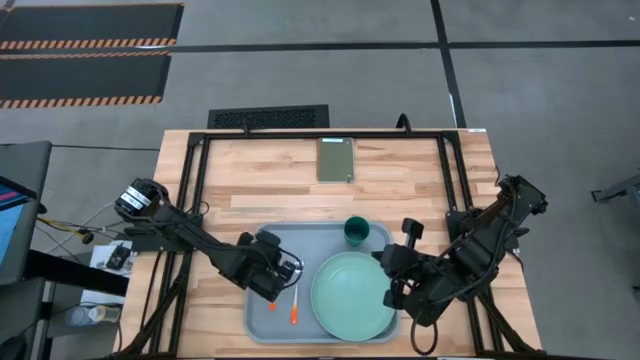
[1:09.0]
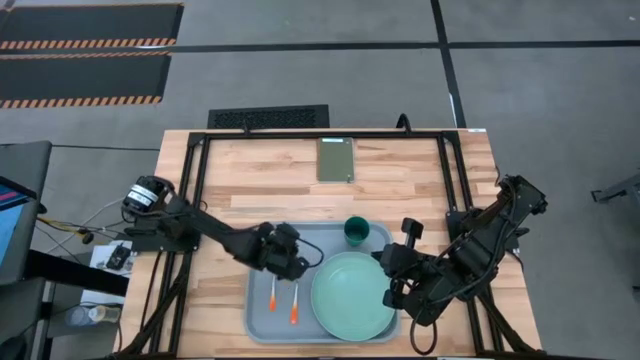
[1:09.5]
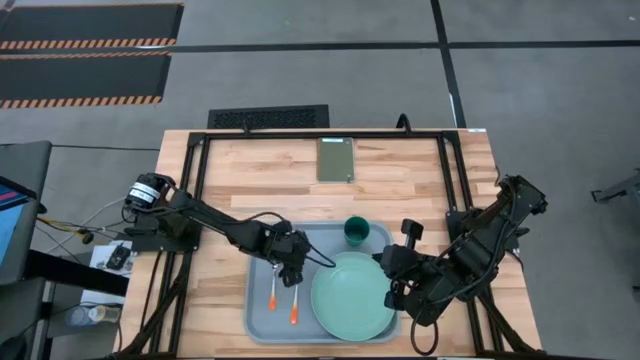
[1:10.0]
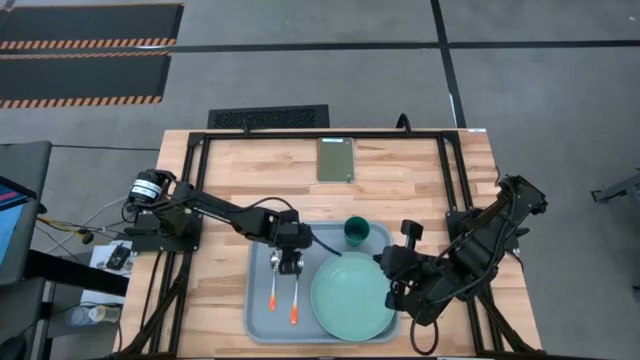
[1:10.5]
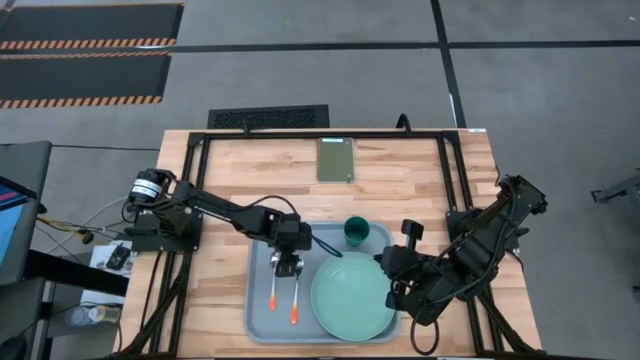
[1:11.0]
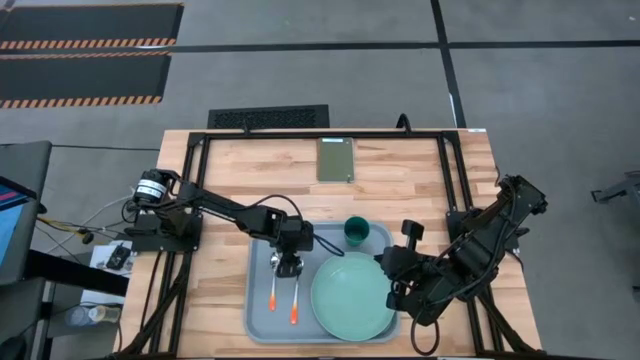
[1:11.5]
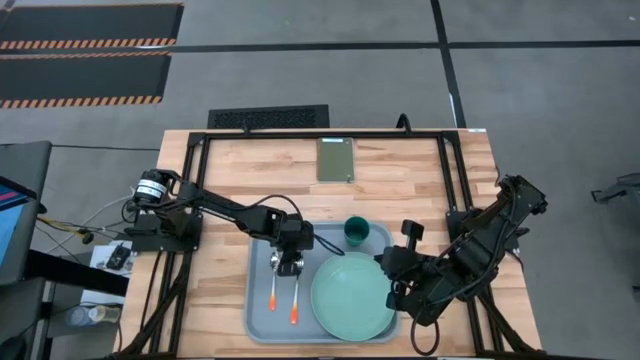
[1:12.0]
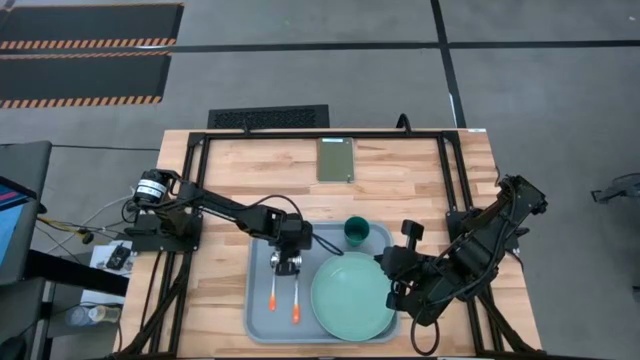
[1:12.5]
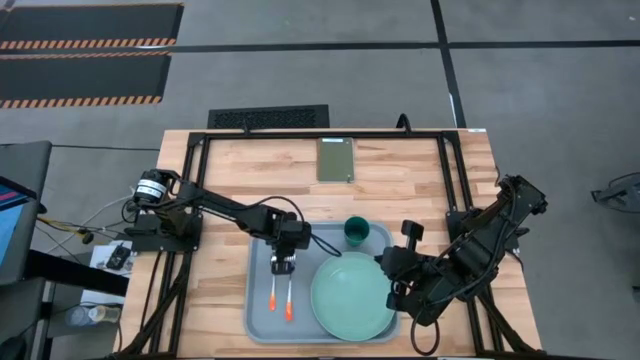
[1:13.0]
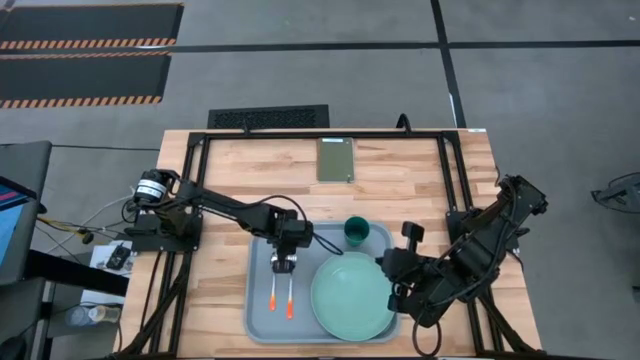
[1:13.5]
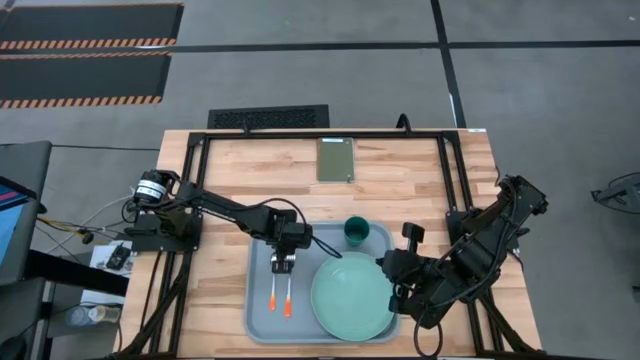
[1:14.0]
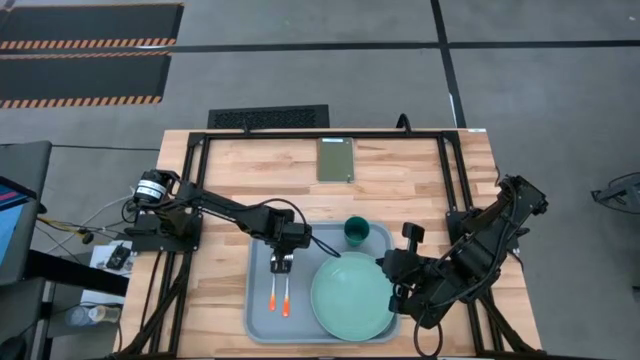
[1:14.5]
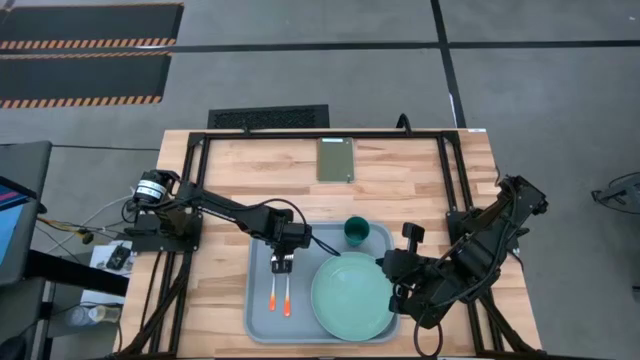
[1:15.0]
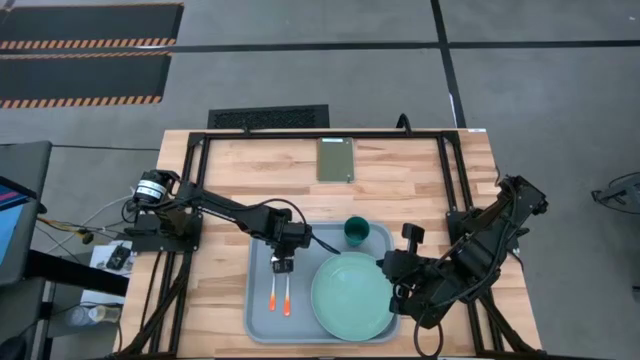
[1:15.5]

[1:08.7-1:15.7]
Task: Pick and place plate/cup/fork/spoon on tray
Adjust the fork on the blue tray

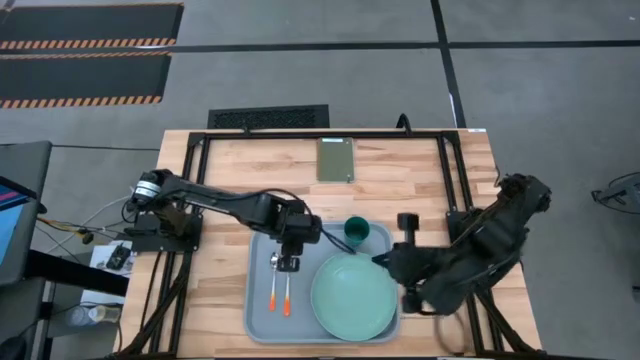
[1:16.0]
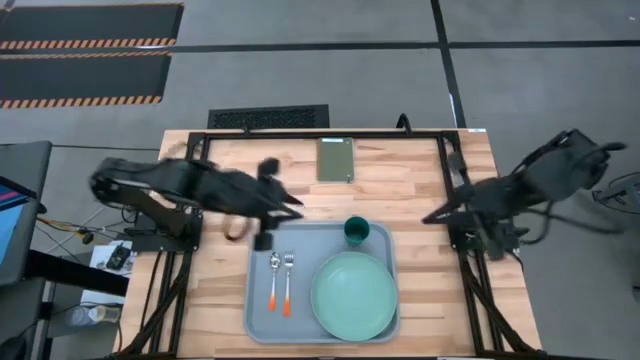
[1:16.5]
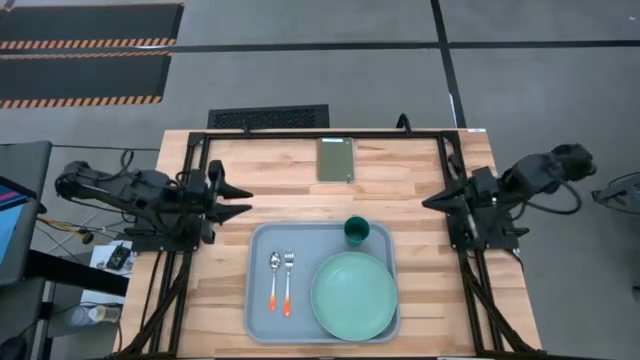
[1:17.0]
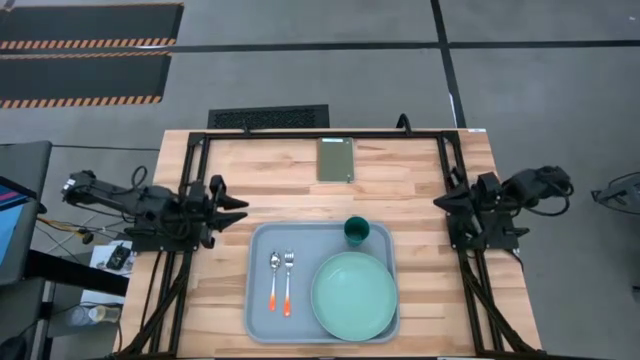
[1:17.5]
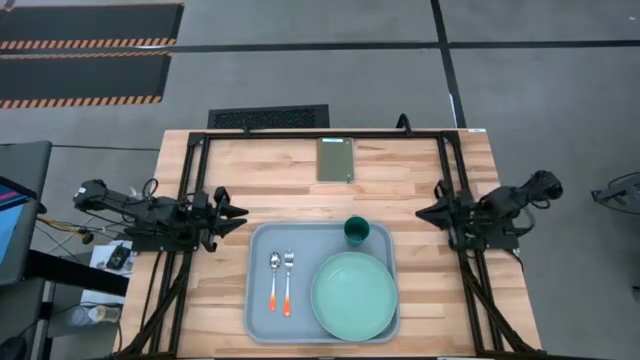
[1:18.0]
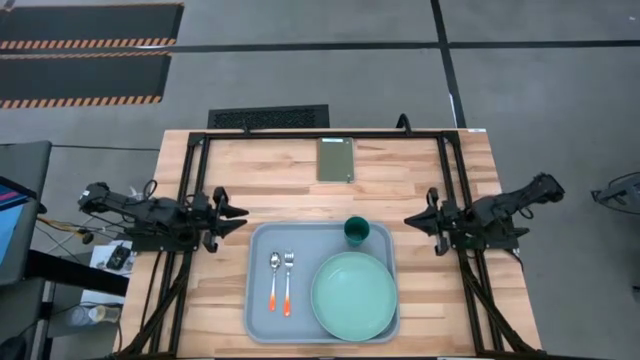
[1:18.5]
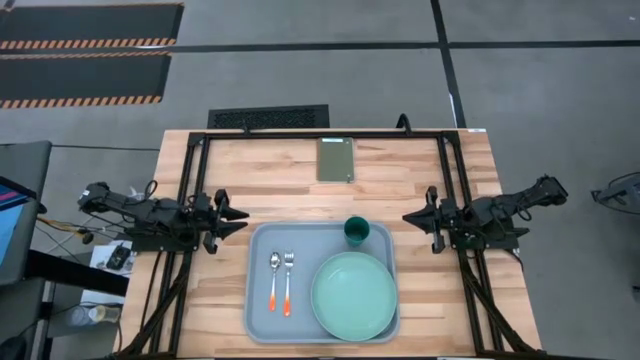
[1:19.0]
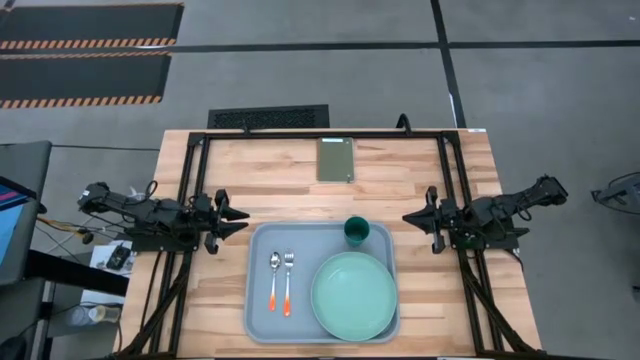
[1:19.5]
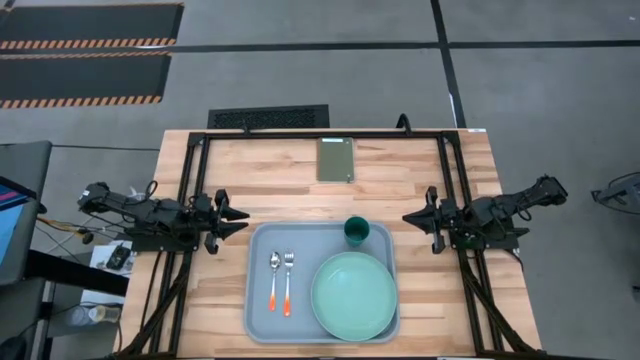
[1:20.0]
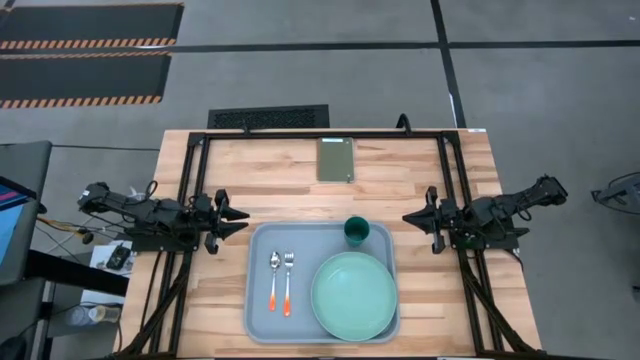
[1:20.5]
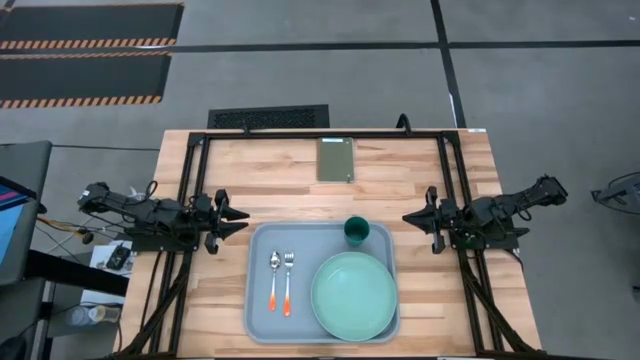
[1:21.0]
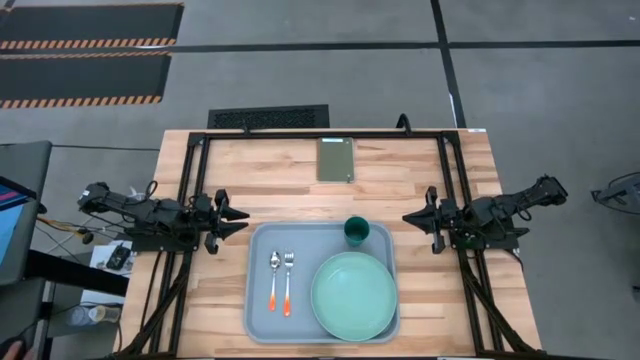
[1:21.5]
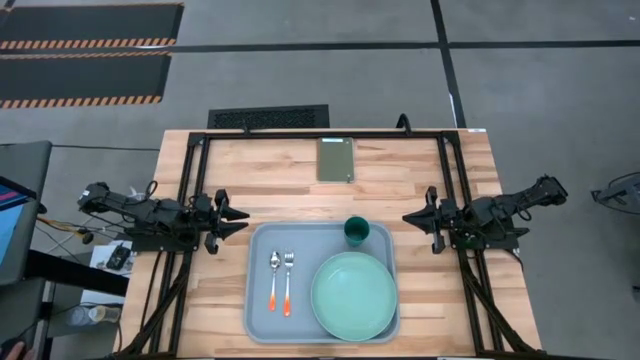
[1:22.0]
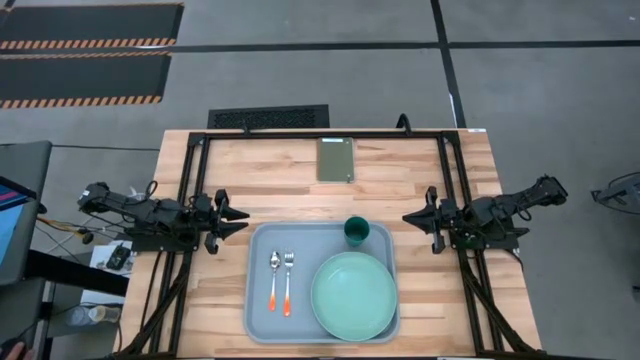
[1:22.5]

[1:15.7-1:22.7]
Return to Home Position

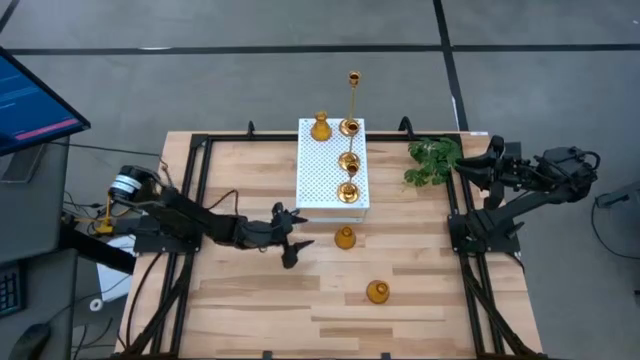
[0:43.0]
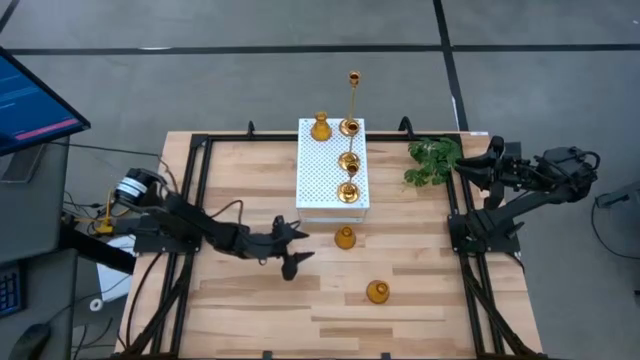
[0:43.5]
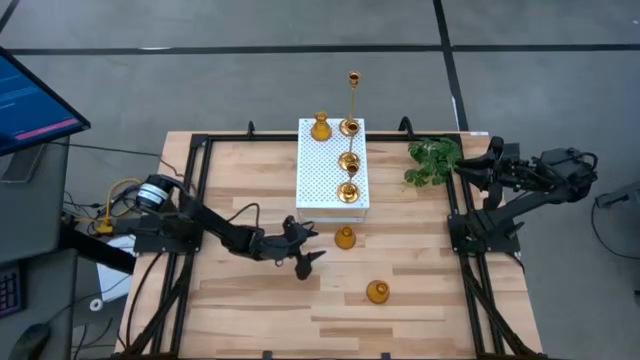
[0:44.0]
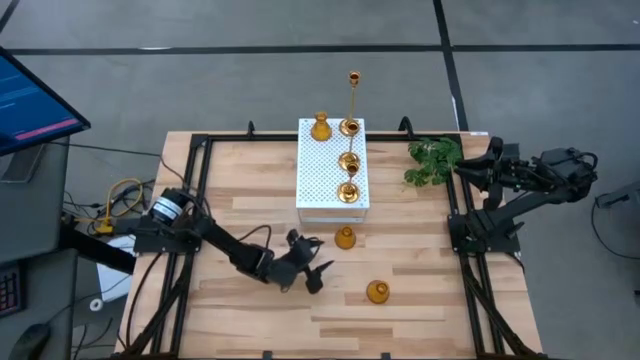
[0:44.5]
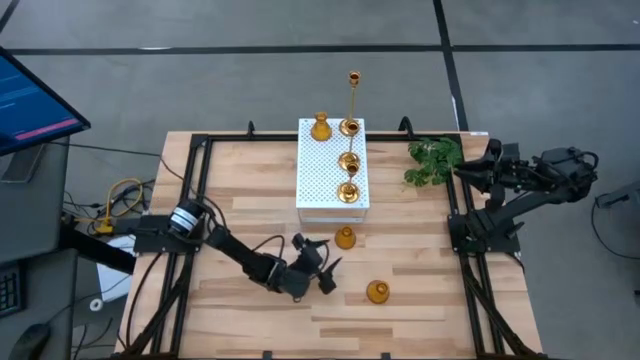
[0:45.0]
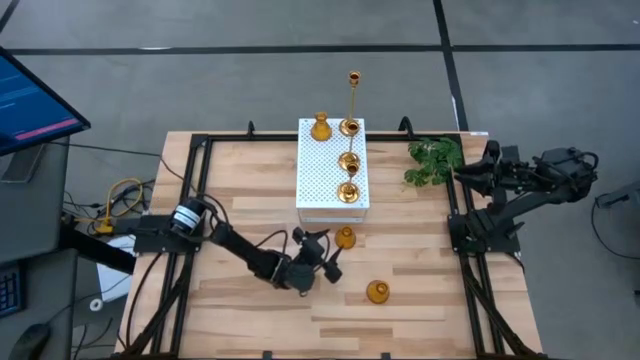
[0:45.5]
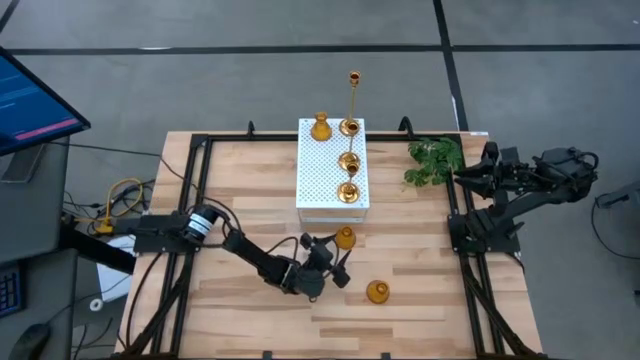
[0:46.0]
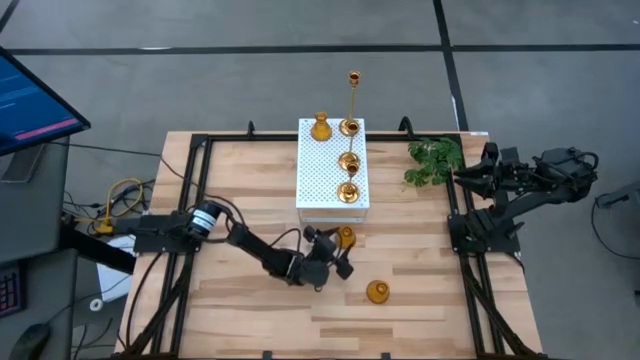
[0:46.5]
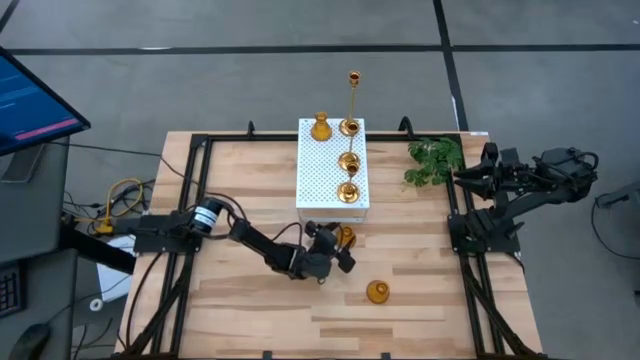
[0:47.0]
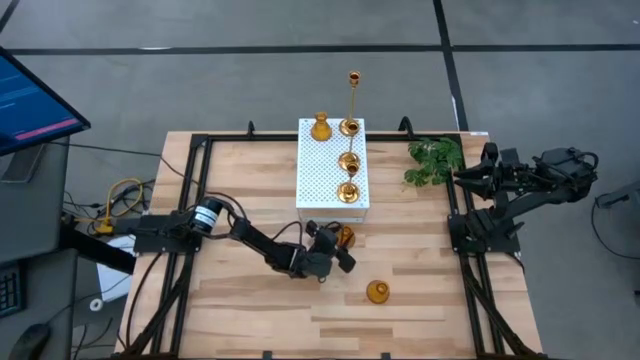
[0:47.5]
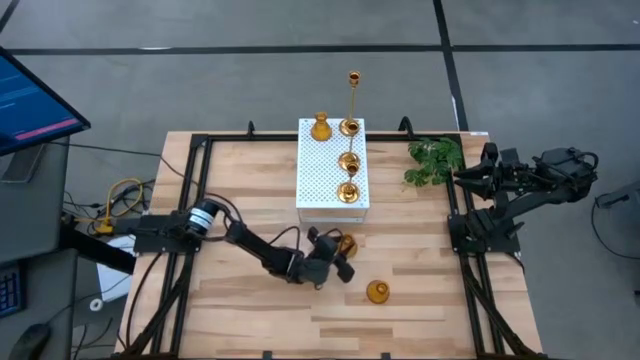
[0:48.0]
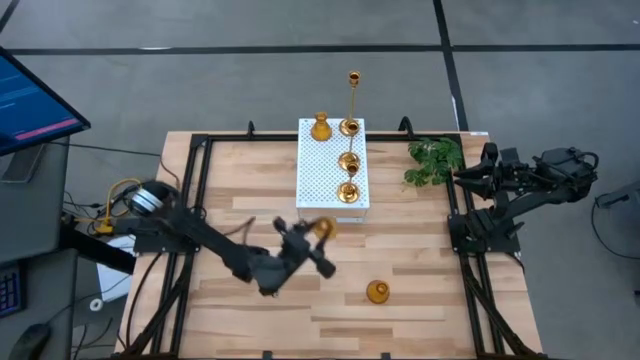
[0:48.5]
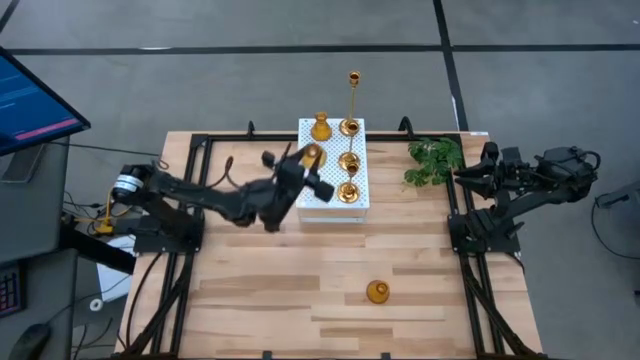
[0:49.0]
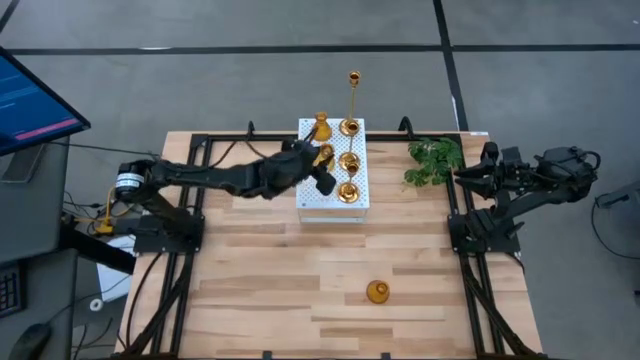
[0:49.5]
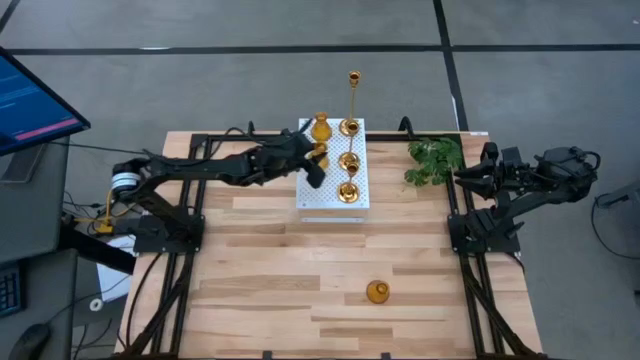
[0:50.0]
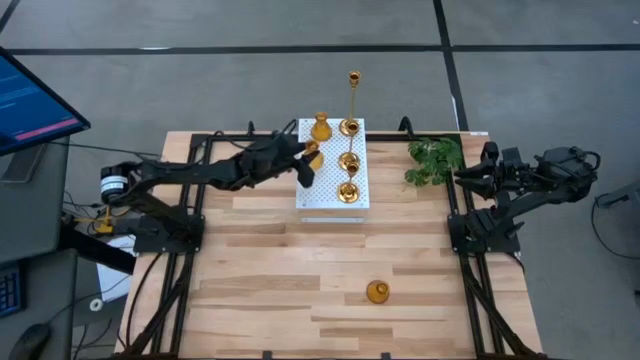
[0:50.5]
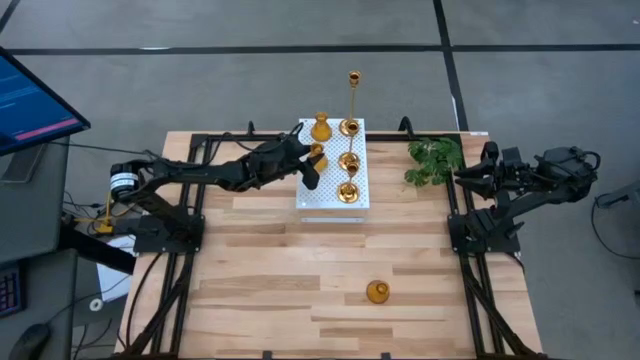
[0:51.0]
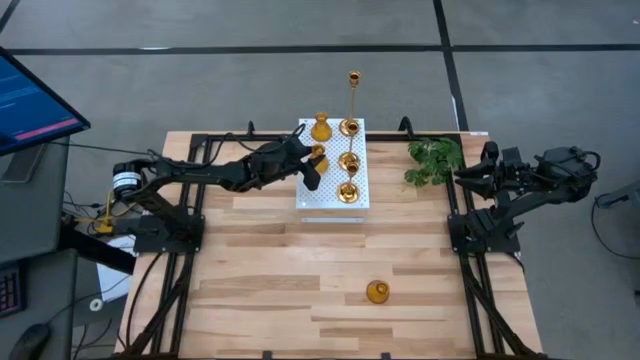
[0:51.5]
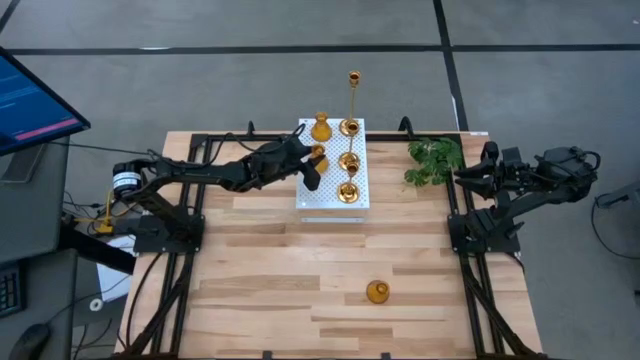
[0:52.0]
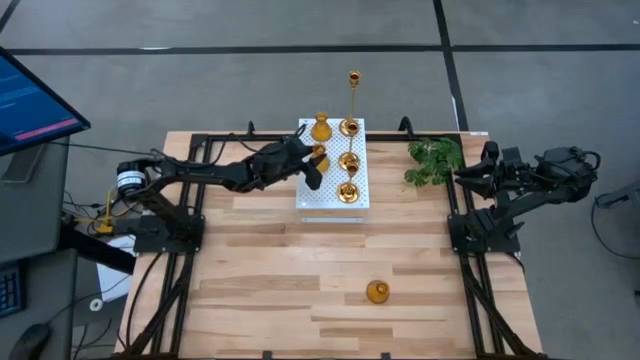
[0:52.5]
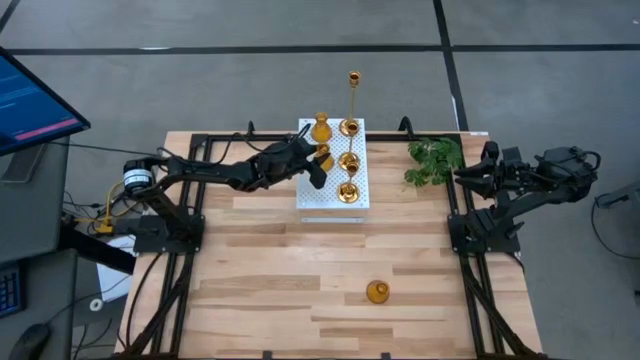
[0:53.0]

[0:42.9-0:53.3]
Task: Pick & Place candle stick holders
Align the top orange candle holder with the other orange candle holder on the shelf
